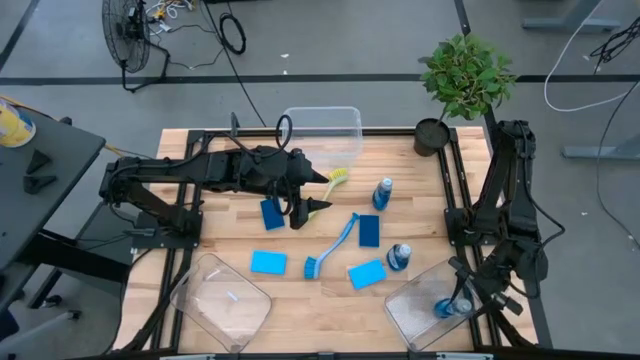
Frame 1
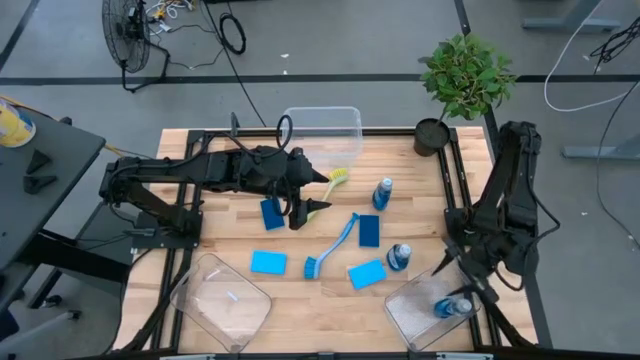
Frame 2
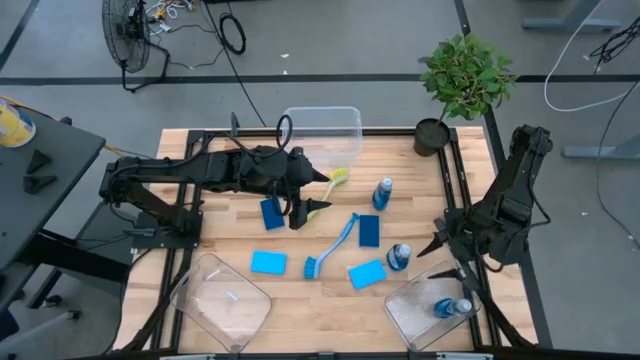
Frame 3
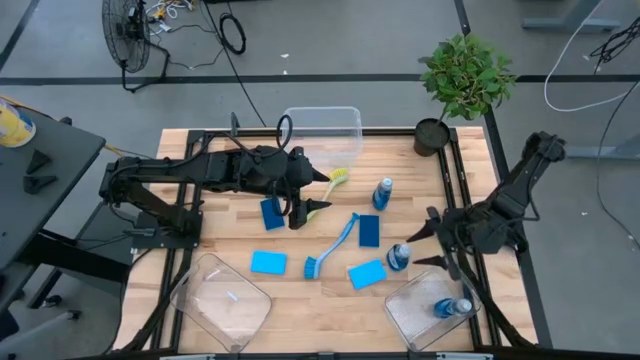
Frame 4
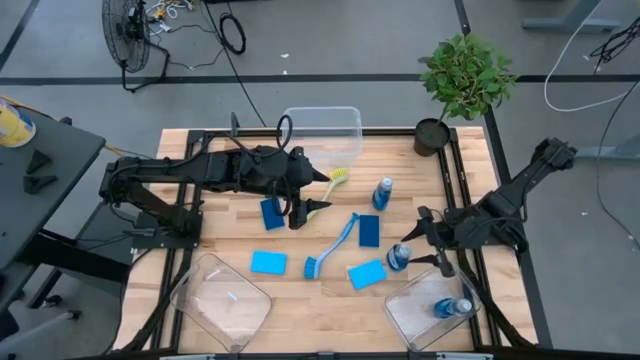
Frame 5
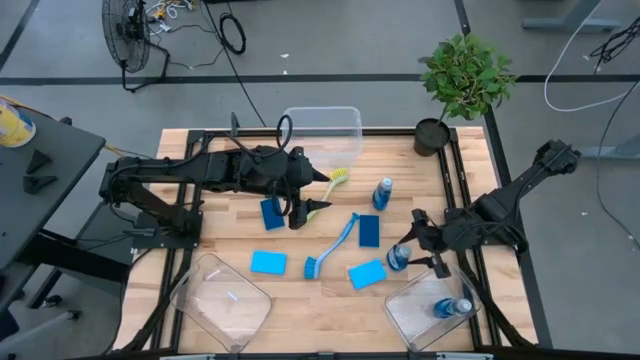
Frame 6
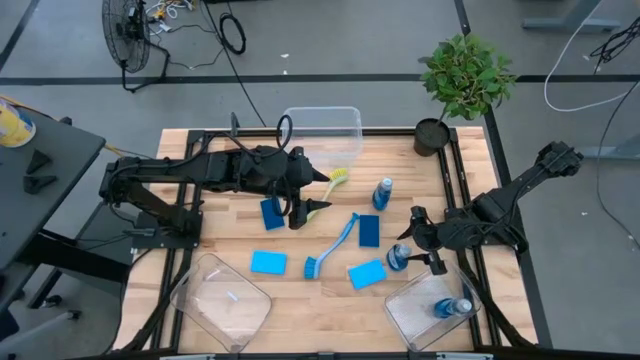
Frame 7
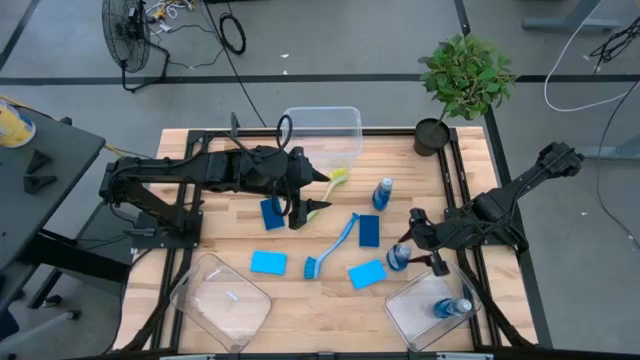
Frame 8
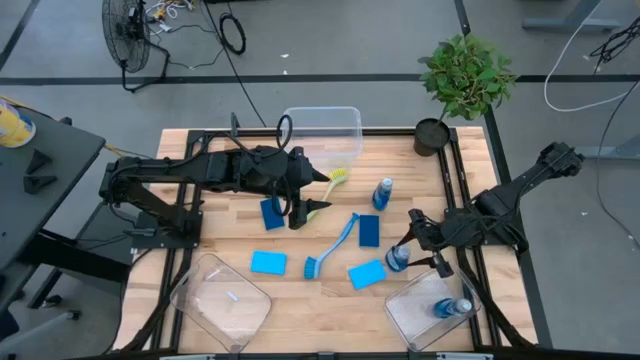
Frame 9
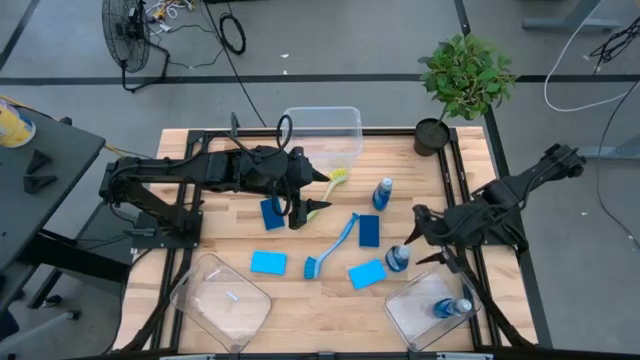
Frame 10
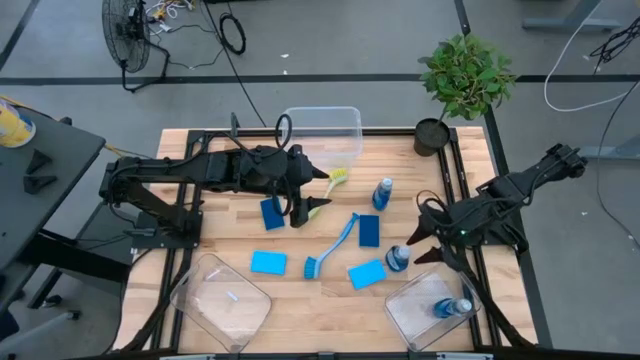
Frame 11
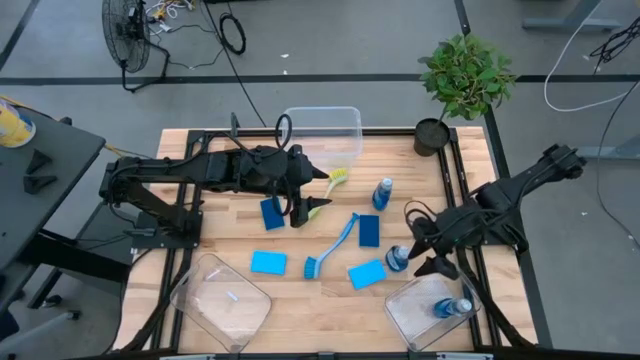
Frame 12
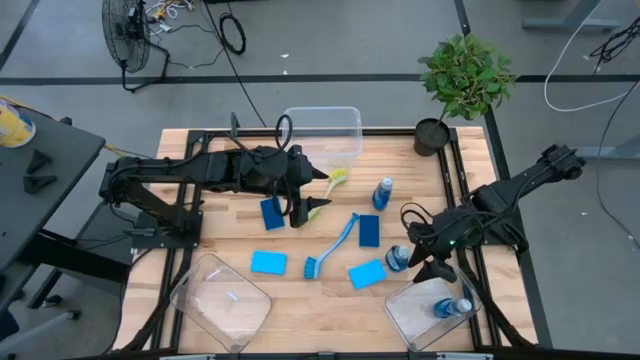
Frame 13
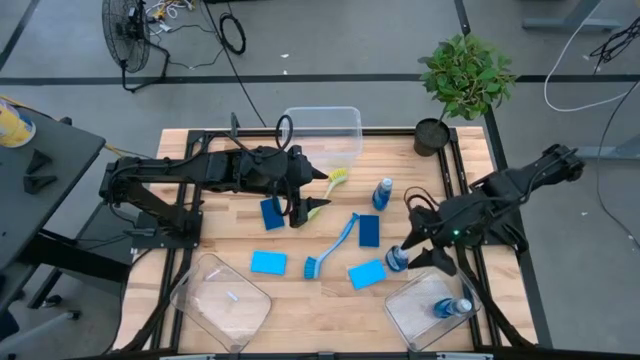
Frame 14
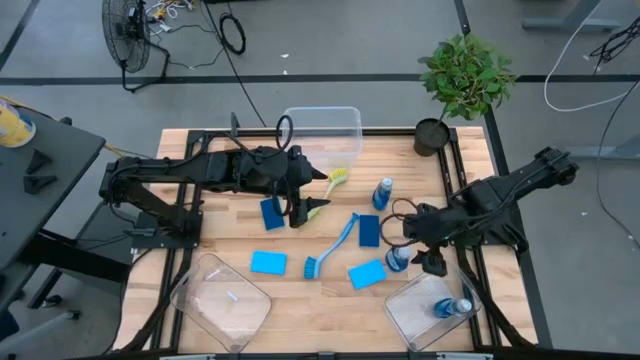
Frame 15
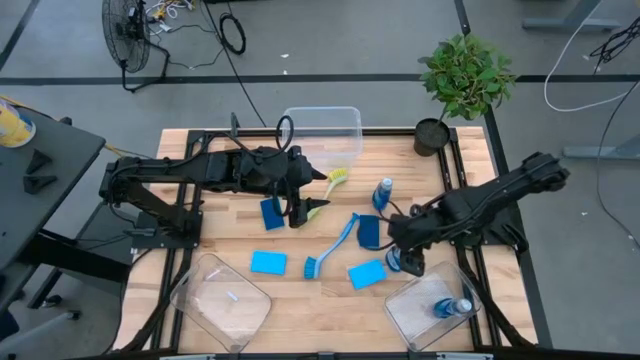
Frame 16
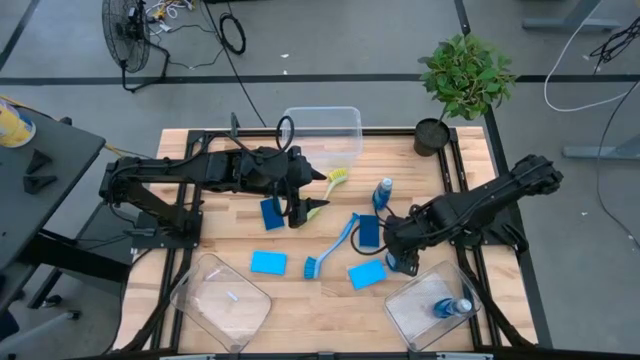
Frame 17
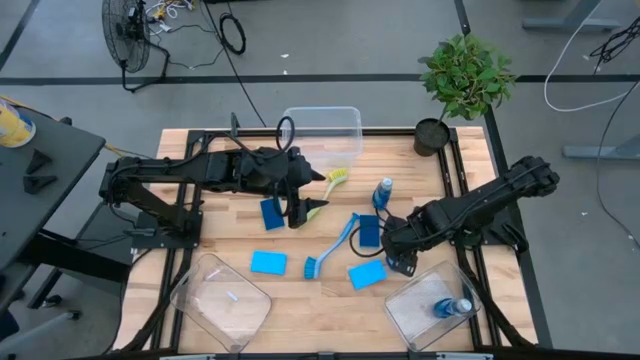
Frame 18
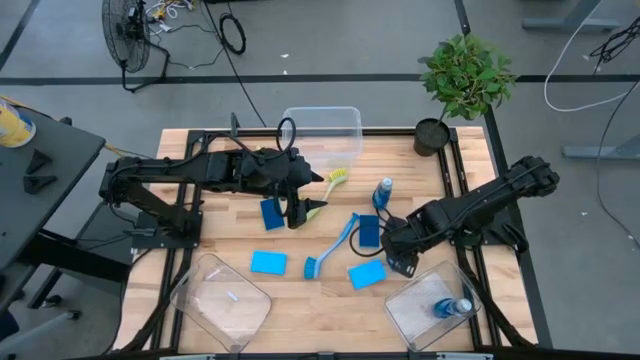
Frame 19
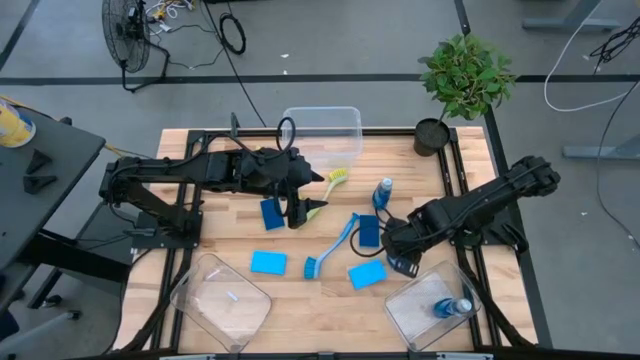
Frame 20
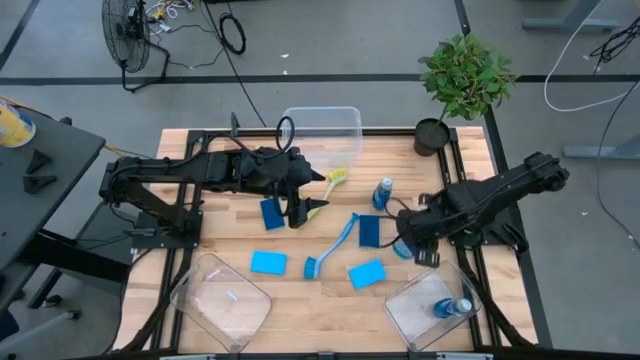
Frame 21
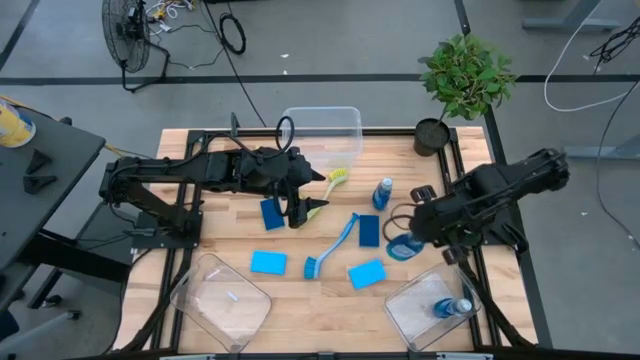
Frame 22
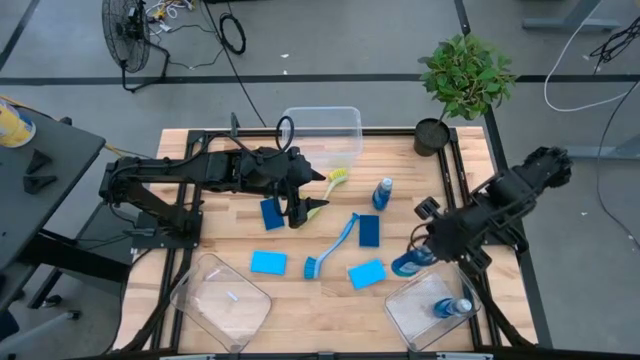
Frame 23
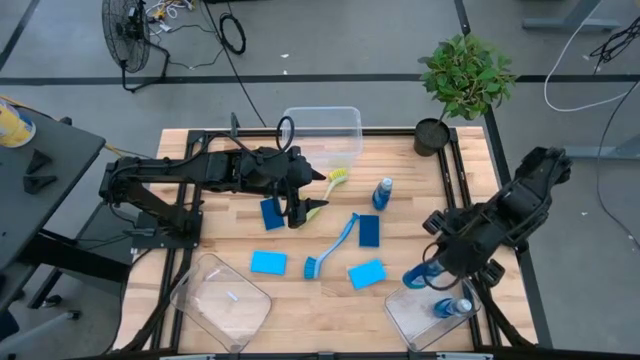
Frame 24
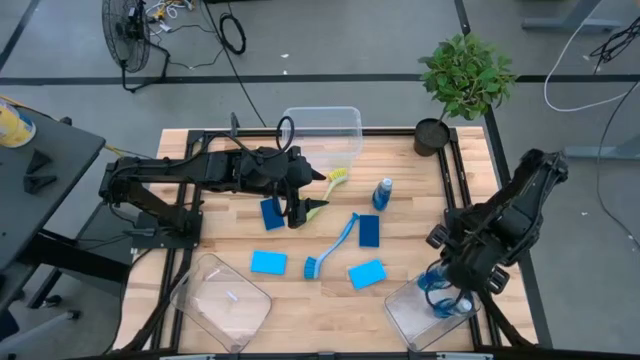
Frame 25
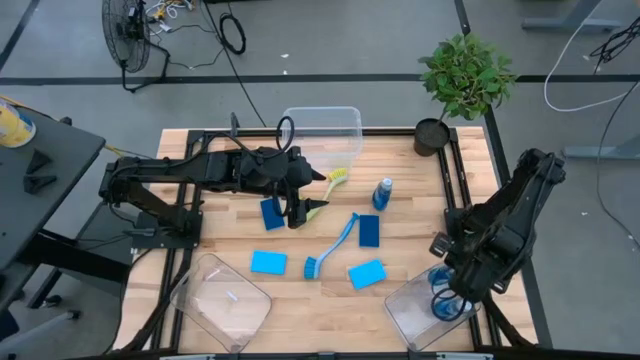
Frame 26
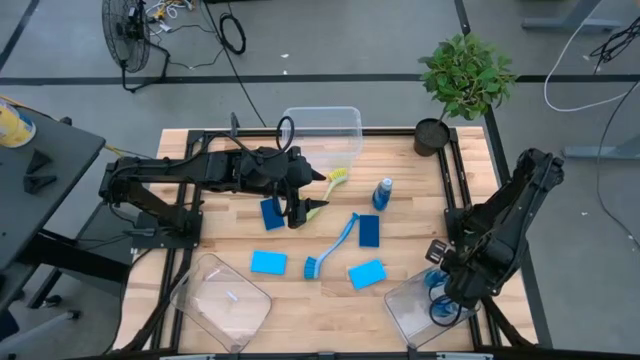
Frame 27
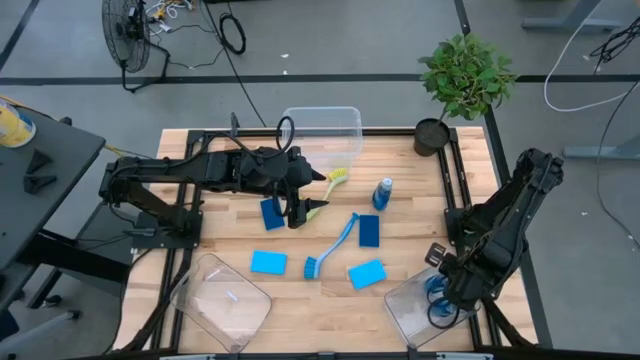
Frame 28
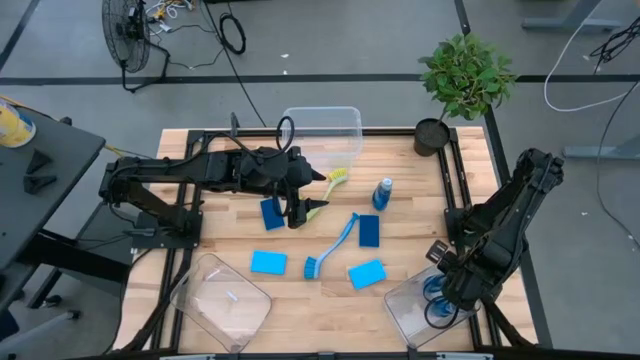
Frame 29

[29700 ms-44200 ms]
Task: Pick & Place Kitchen Sink Supplies
Put the blue dishwashing liquid into the bottom right transparent bin

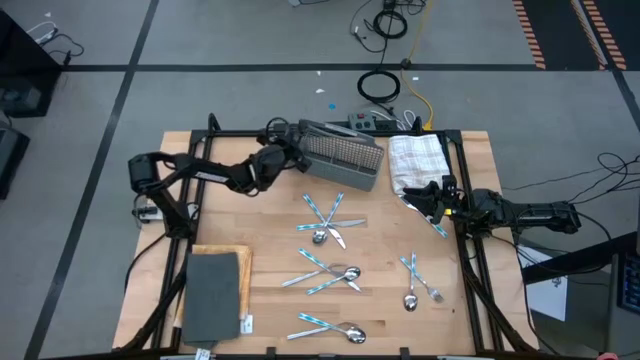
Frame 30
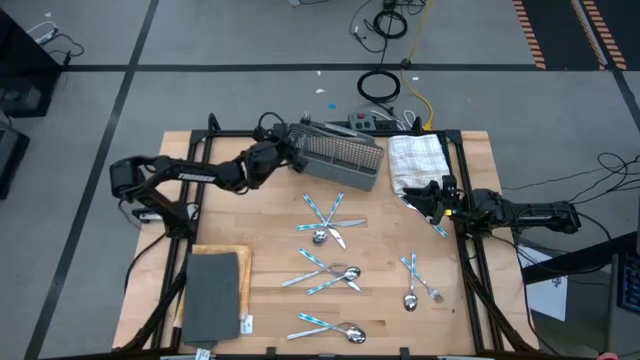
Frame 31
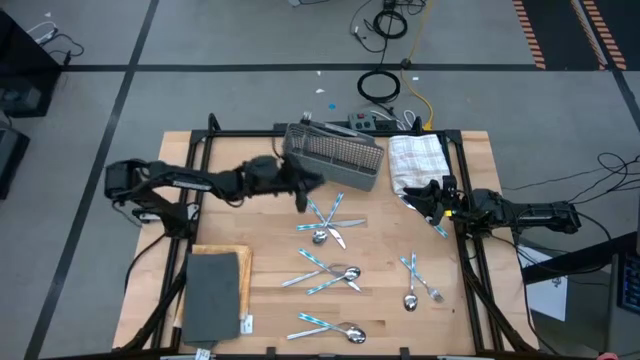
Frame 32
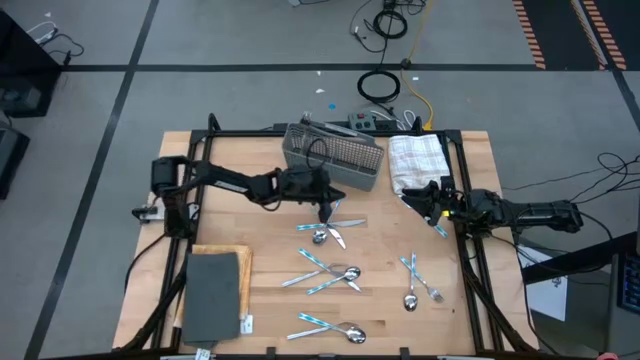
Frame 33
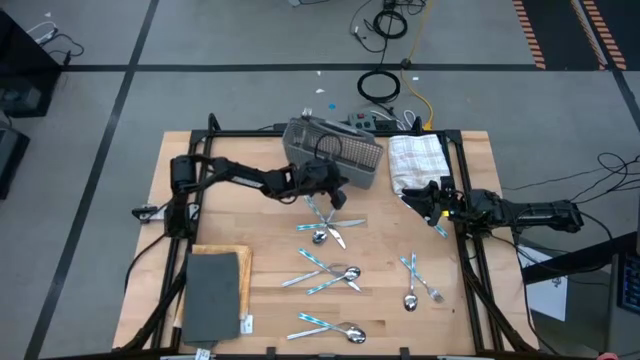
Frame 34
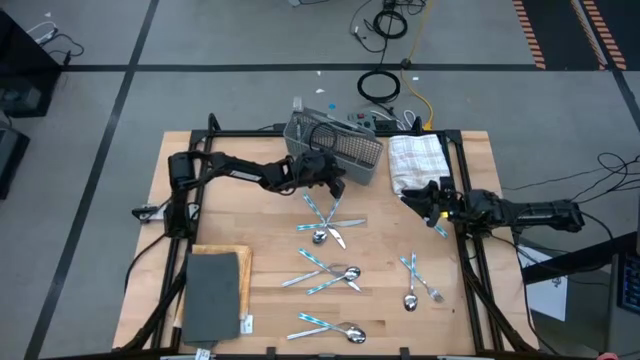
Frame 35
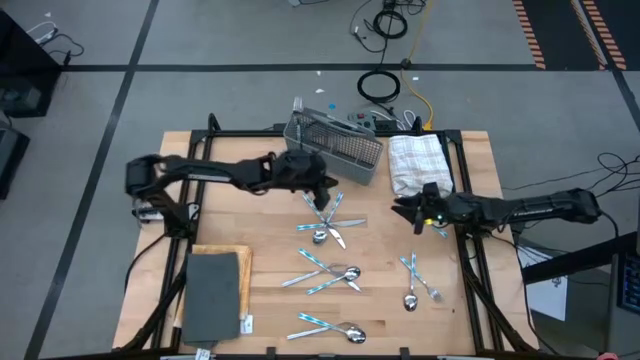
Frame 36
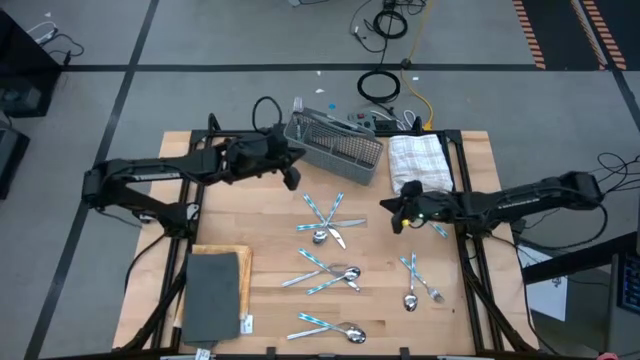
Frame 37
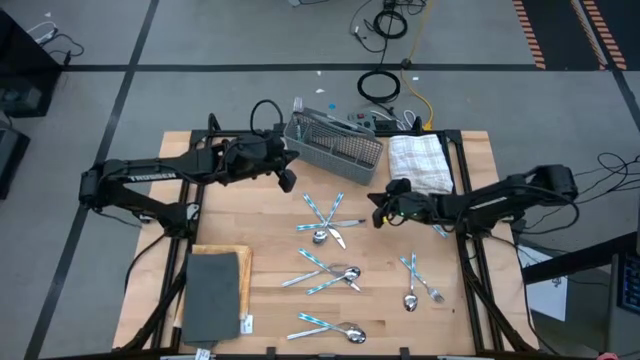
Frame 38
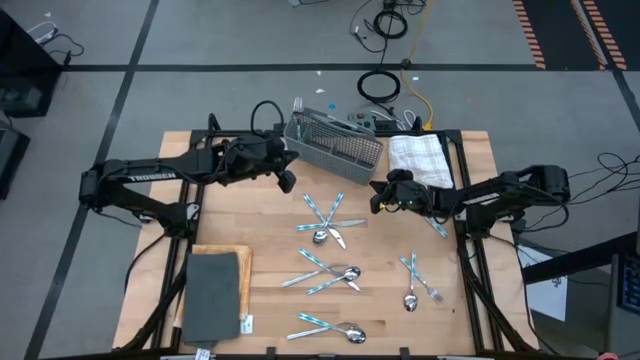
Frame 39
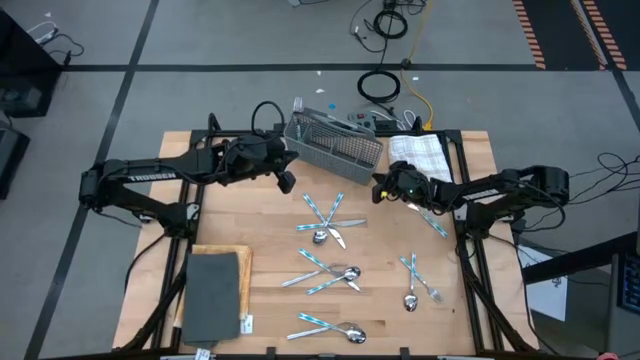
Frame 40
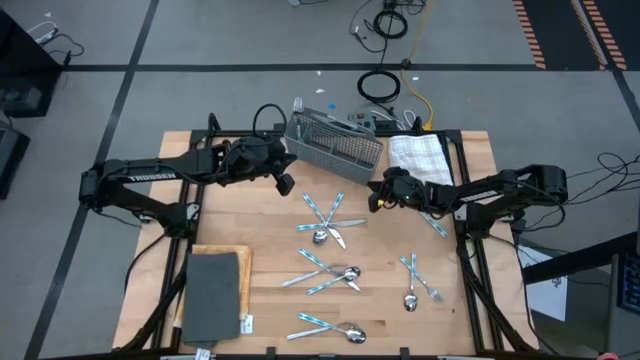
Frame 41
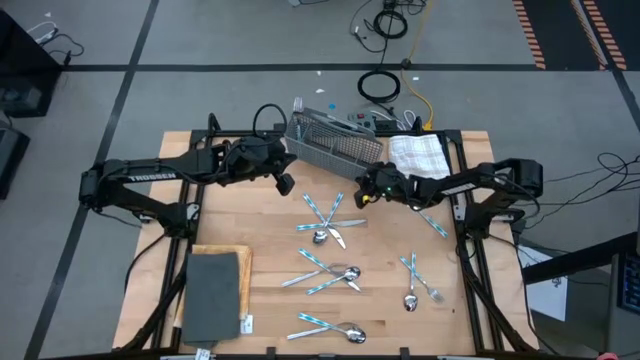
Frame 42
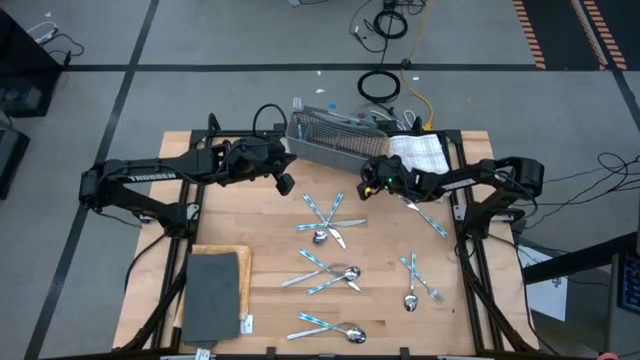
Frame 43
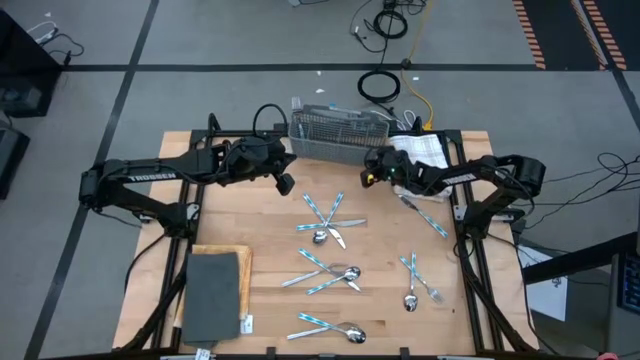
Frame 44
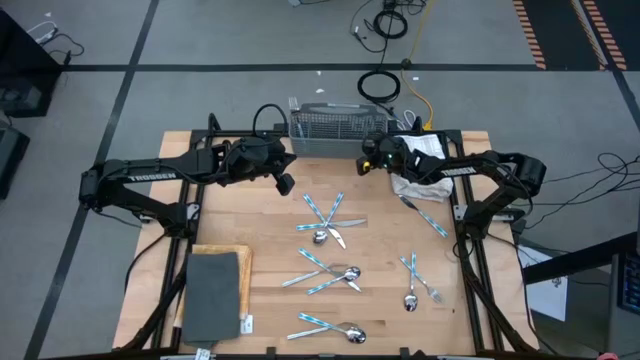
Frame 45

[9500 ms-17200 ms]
Task: Sort silverware
Adjust the silverware basket
